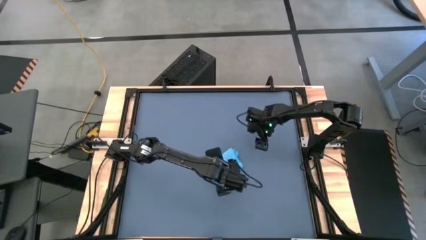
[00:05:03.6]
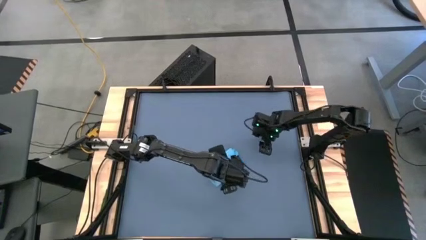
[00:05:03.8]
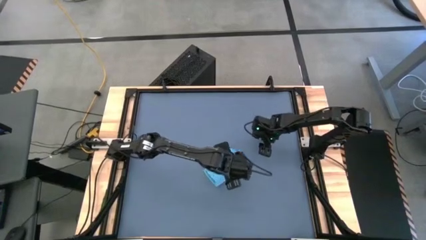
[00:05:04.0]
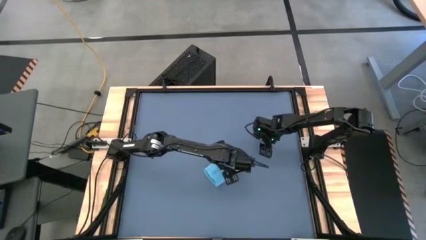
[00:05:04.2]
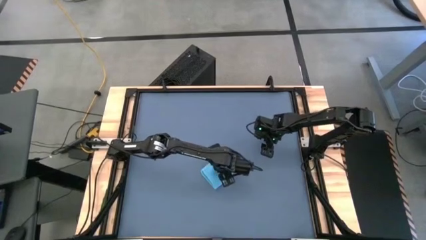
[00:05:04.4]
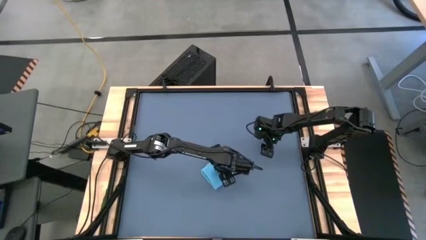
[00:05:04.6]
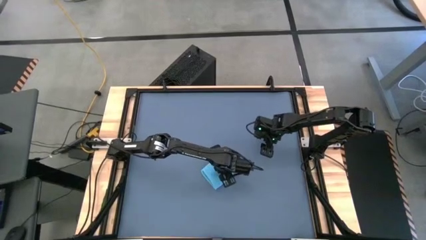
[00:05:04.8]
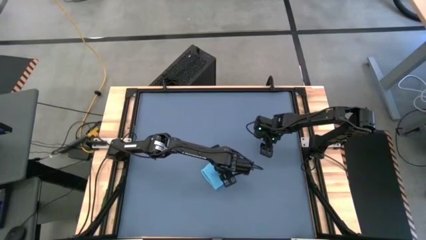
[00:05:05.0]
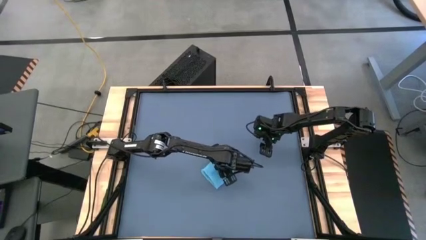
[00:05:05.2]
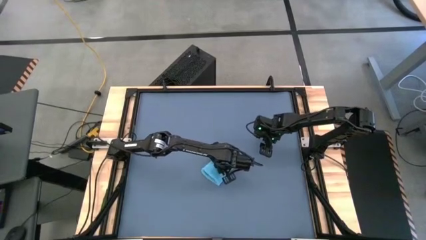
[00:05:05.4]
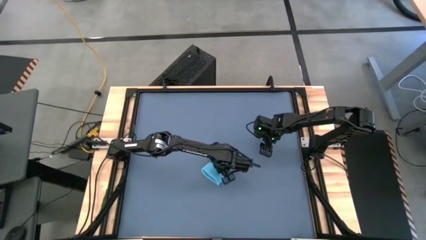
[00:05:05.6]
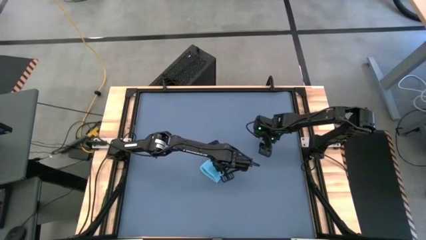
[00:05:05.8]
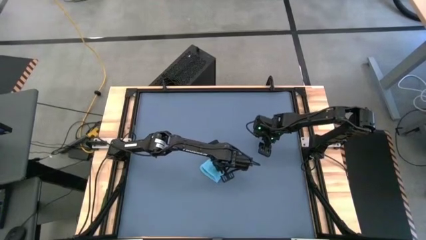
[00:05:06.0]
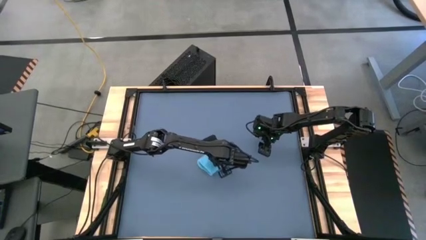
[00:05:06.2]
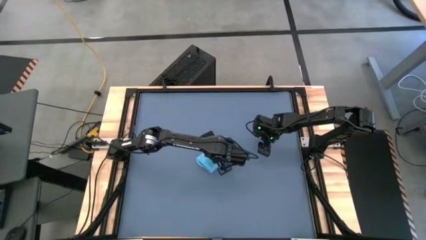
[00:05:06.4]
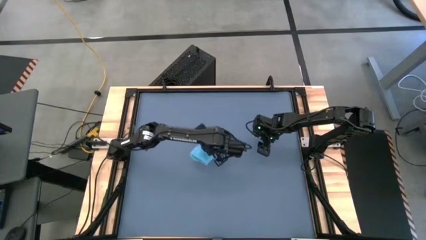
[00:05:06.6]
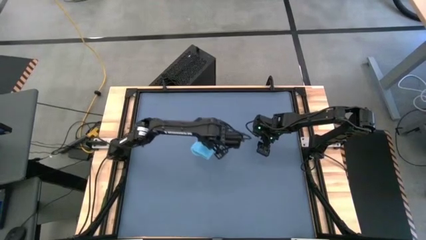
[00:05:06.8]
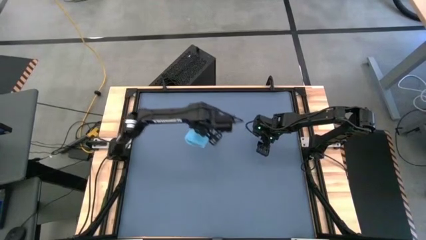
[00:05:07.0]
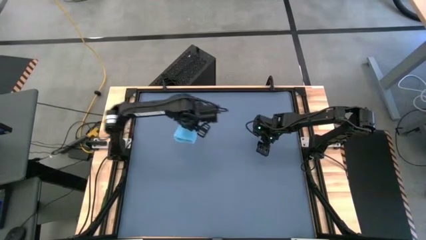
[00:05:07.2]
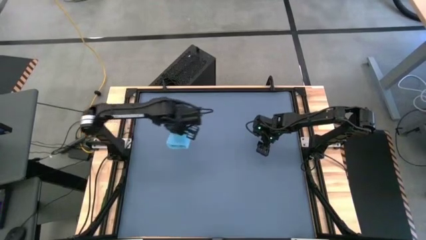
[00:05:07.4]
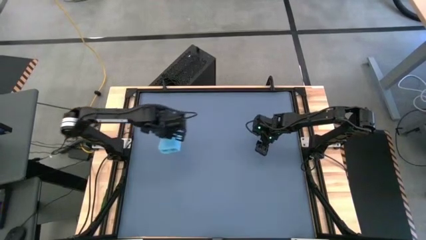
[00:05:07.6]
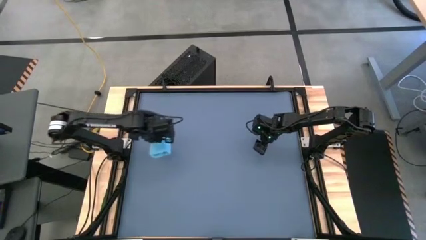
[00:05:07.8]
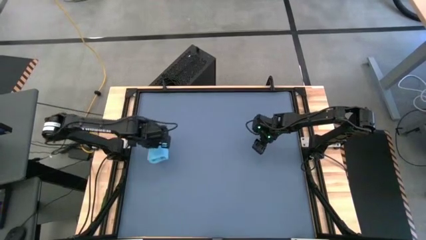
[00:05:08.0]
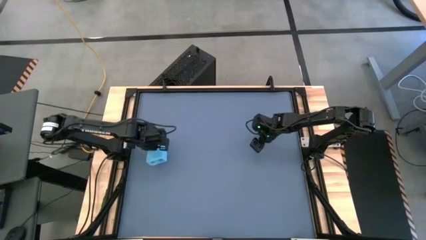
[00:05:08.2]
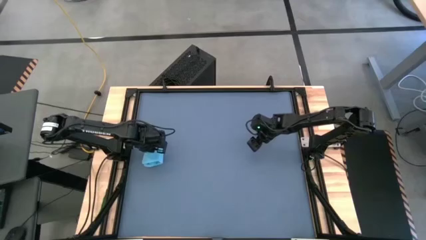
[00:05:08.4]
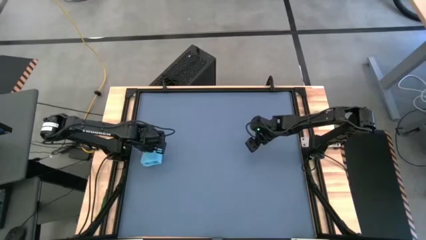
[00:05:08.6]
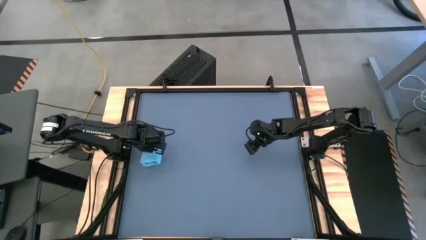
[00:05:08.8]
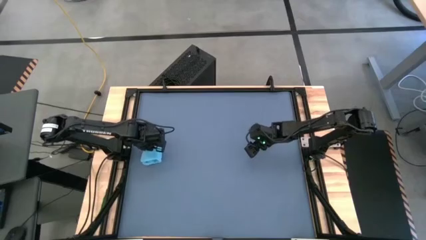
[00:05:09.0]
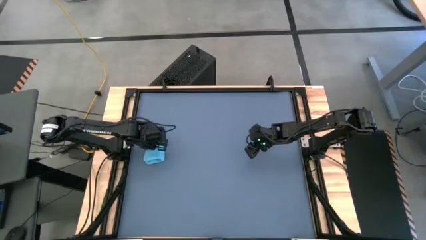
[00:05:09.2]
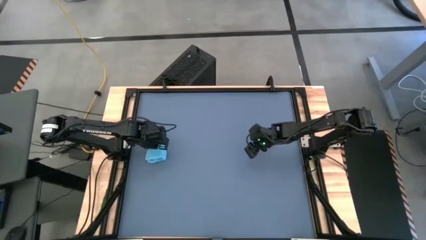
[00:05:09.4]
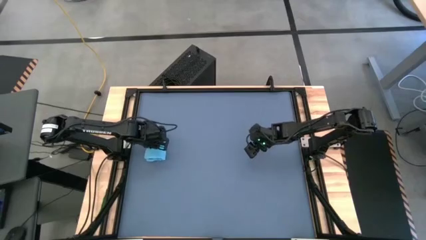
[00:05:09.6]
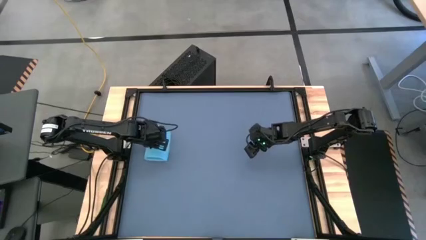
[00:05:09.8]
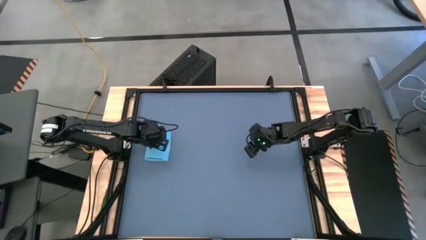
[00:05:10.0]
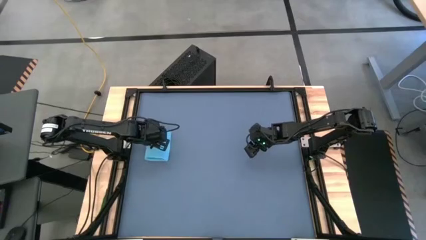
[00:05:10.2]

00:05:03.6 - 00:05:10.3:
Task: Roll towel
Move the blue microfiber towel to the left of the table

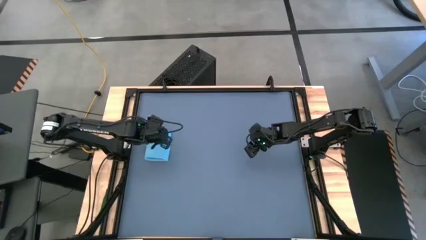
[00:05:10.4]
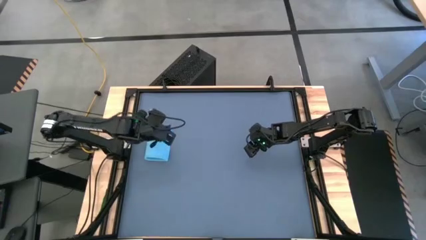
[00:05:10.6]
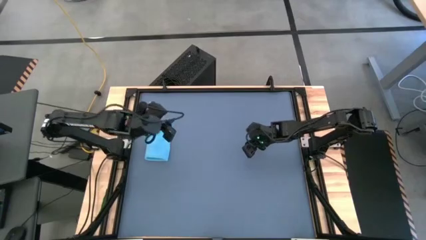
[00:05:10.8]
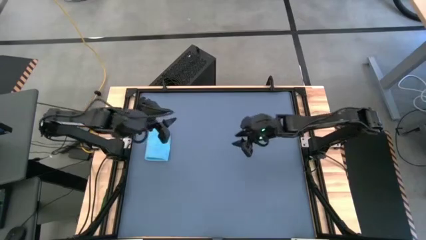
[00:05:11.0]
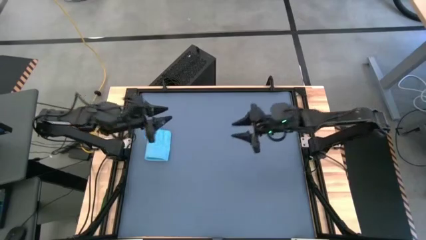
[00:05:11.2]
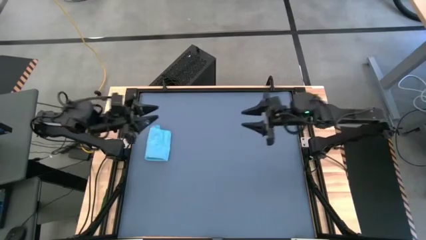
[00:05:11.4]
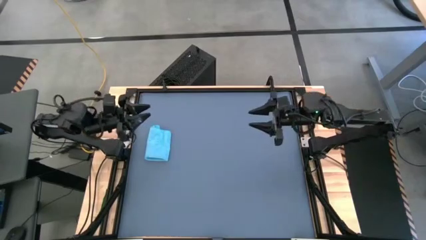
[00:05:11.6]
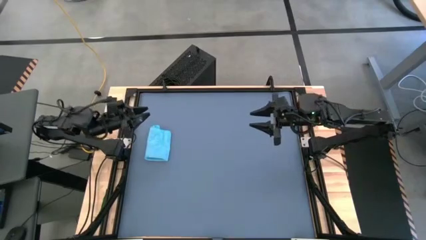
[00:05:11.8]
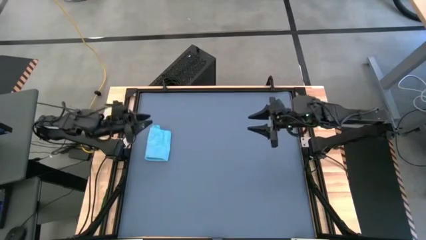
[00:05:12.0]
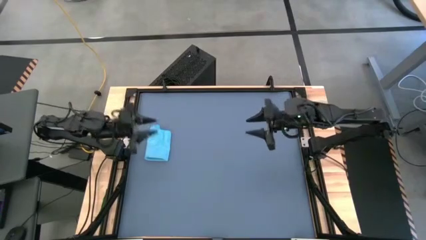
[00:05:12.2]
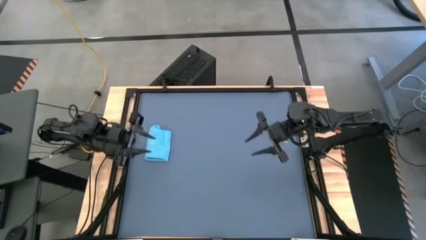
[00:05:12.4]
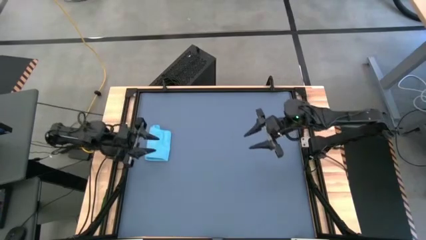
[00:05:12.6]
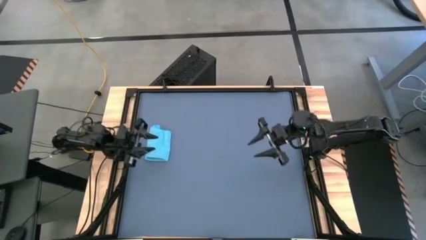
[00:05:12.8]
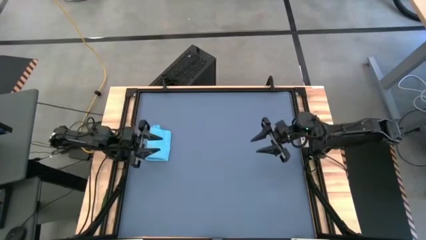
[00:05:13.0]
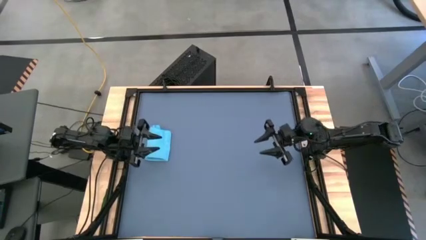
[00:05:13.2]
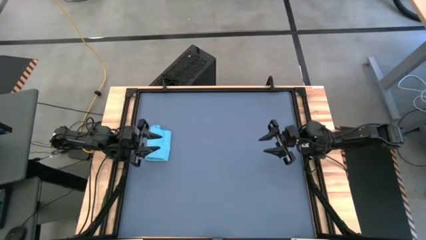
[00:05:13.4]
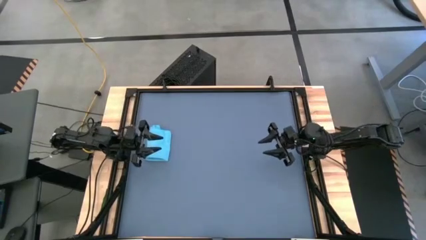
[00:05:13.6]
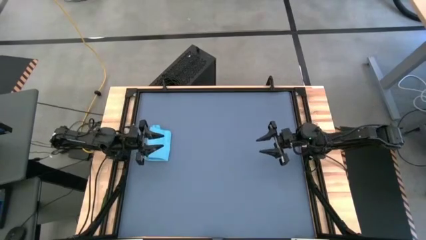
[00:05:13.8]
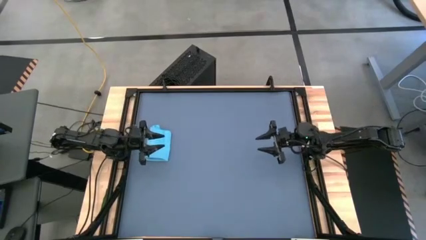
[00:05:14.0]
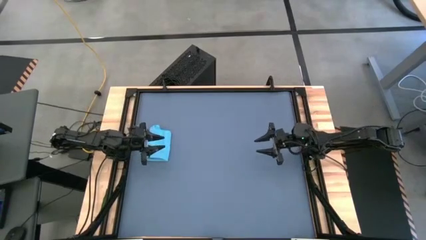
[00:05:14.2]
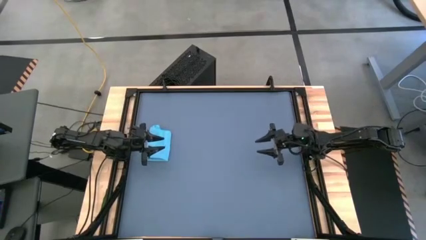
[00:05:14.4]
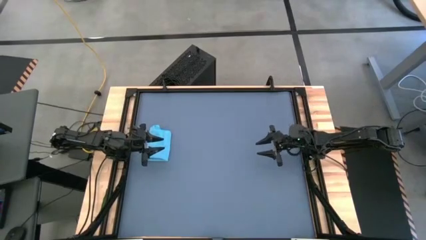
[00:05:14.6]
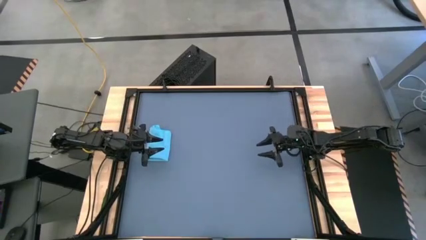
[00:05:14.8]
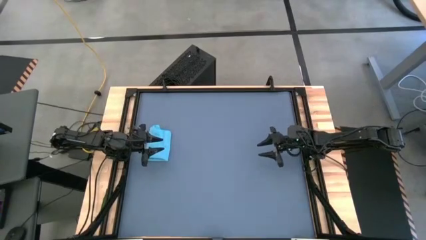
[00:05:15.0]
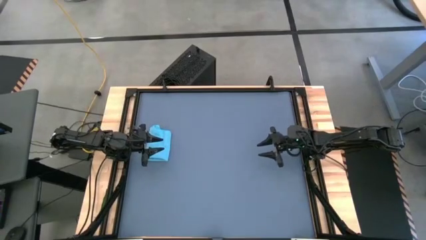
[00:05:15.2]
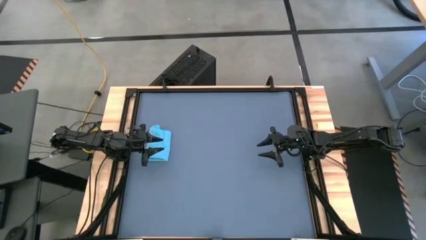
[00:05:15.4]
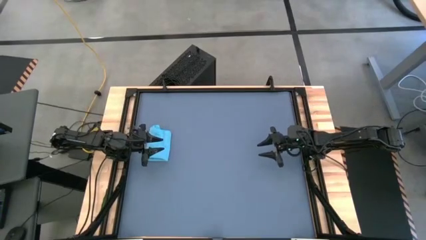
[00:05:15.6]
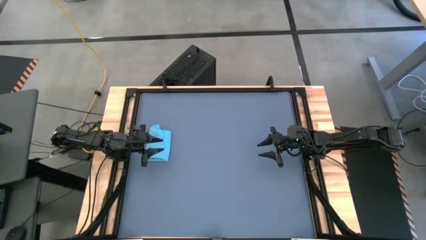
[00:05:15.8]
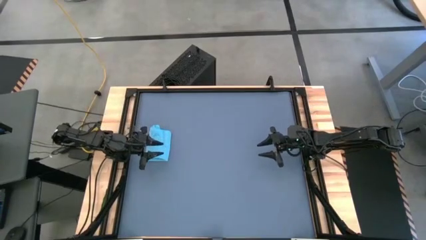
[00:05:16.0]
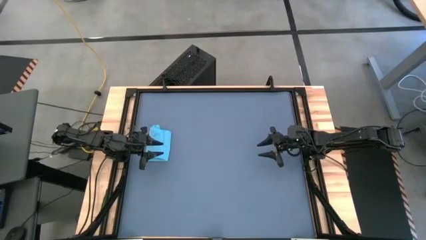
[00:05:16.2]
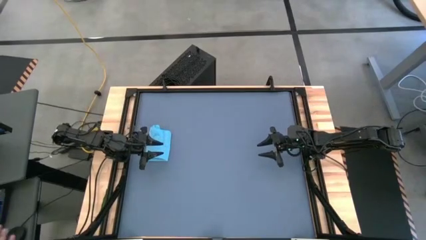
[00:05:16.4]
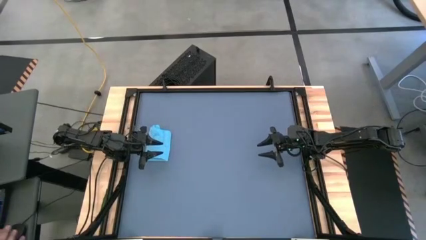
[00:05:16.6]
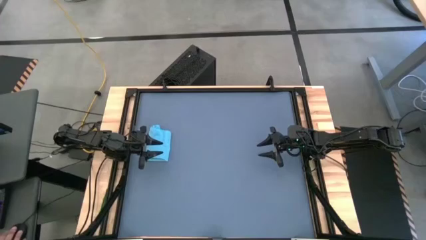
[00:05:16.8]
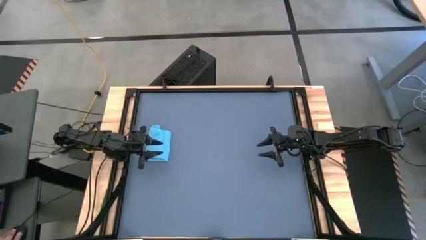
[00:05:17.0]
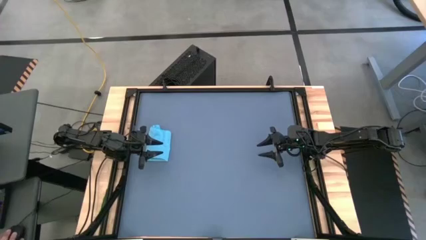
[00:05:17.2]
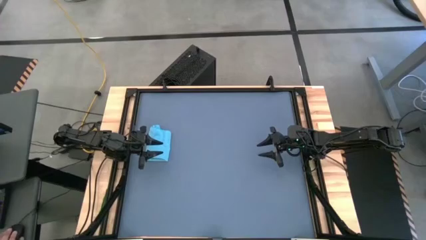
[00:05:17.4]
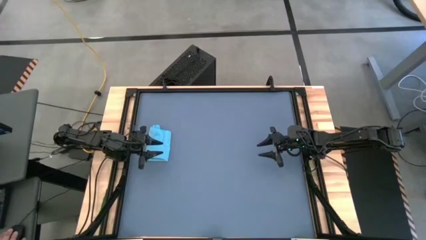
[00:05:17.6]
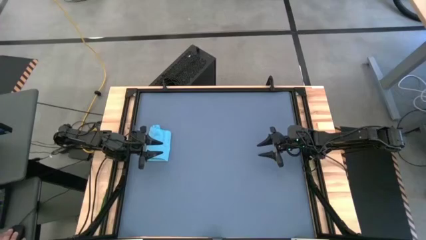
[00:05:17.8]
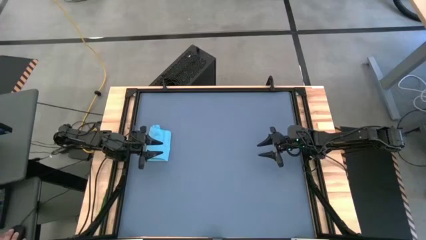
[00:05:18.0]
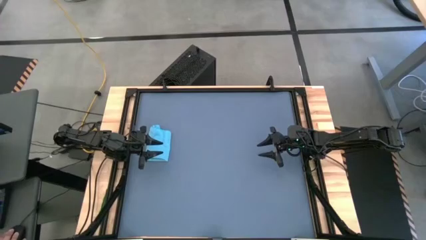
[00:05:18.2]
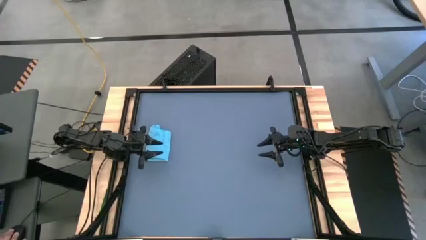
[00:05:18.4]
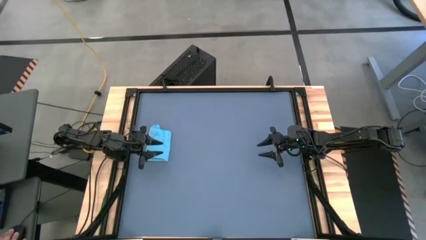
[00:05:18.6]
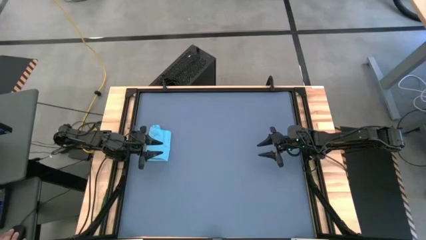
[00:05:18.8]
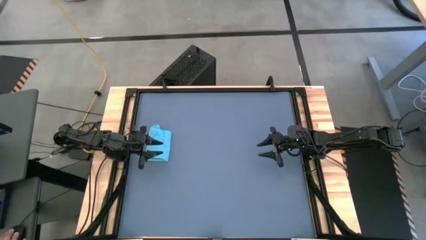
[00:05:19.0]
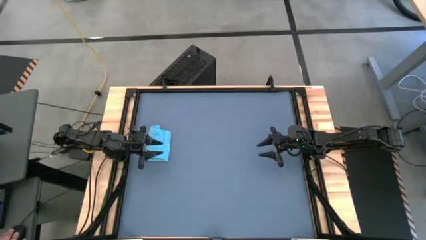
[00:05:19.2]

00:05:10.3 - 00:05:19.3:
Return to Home Position
